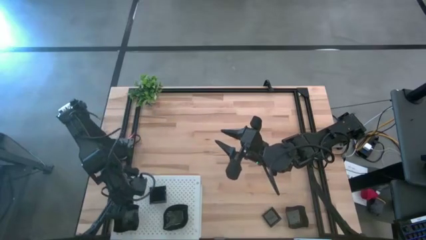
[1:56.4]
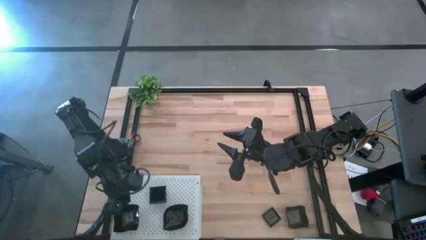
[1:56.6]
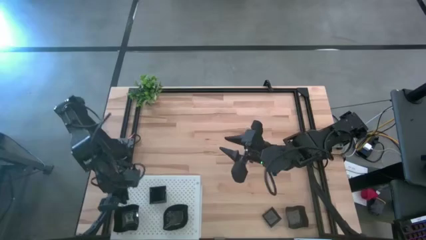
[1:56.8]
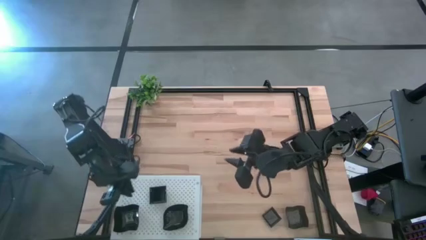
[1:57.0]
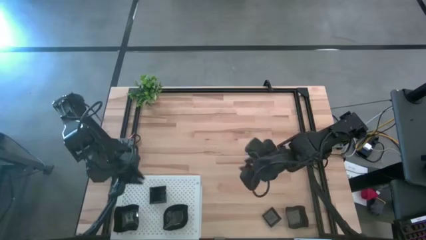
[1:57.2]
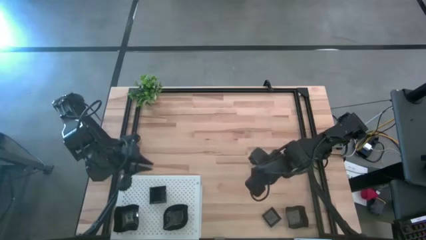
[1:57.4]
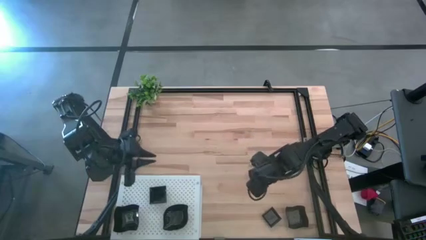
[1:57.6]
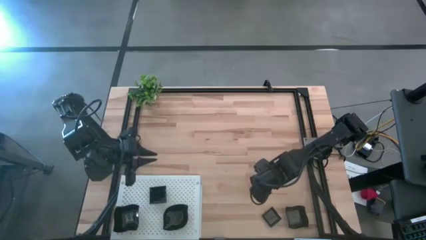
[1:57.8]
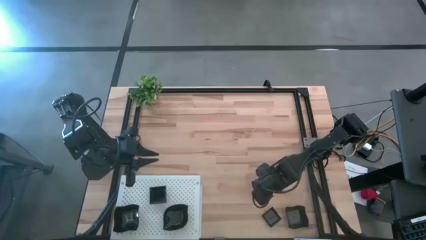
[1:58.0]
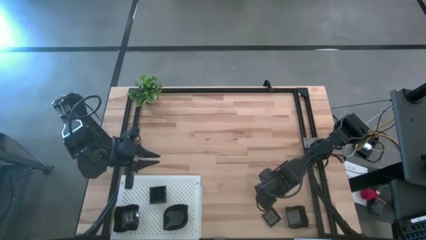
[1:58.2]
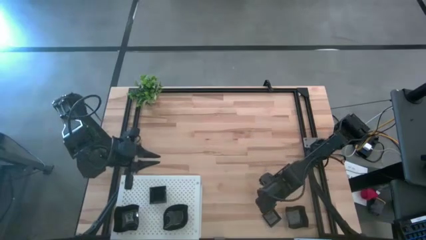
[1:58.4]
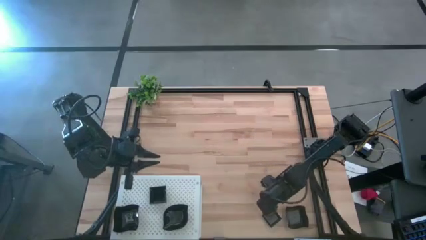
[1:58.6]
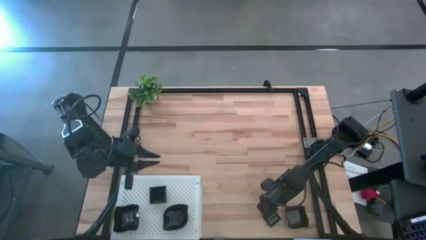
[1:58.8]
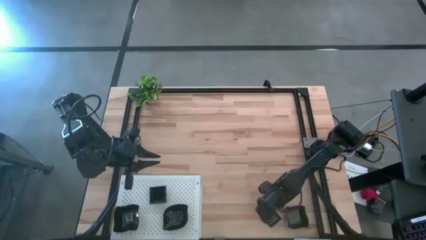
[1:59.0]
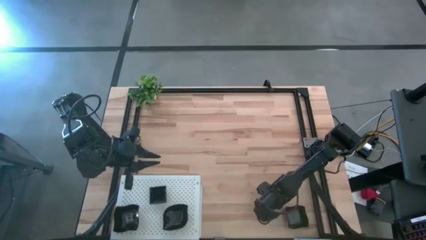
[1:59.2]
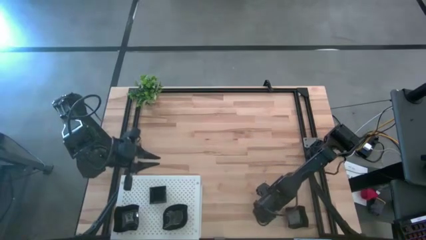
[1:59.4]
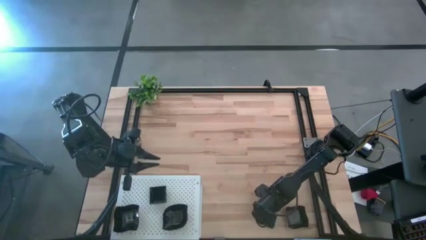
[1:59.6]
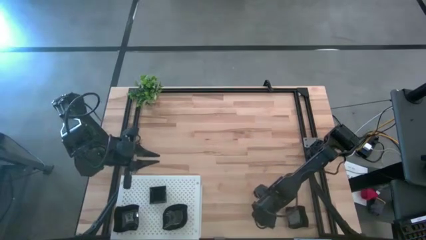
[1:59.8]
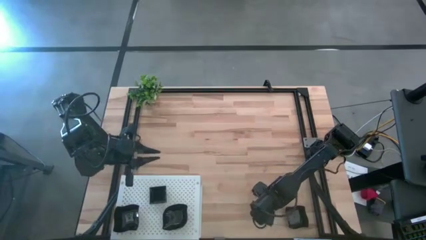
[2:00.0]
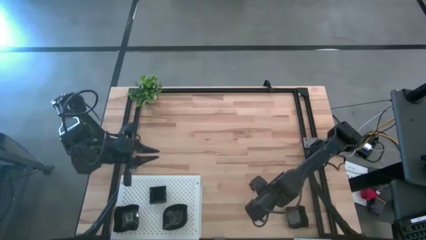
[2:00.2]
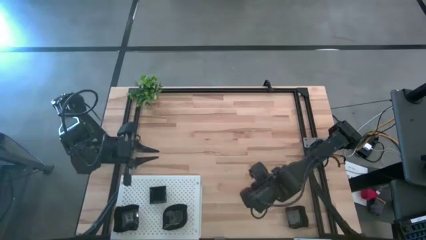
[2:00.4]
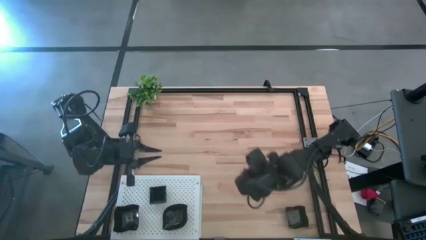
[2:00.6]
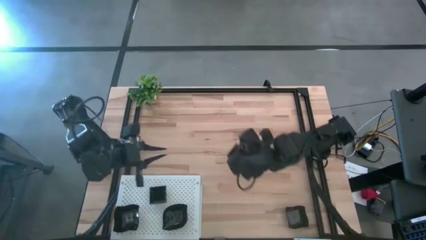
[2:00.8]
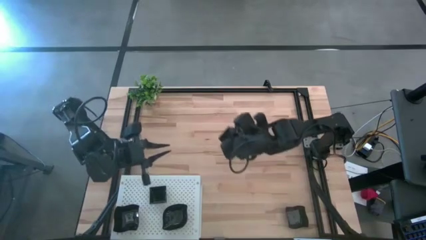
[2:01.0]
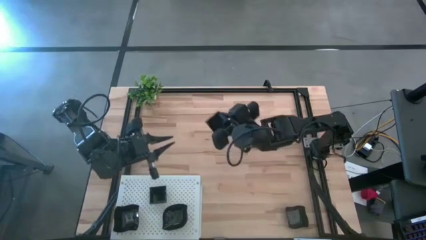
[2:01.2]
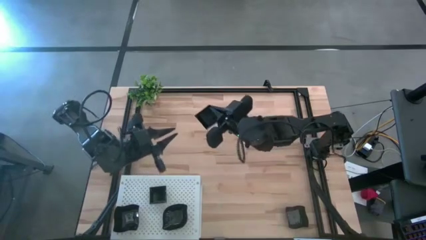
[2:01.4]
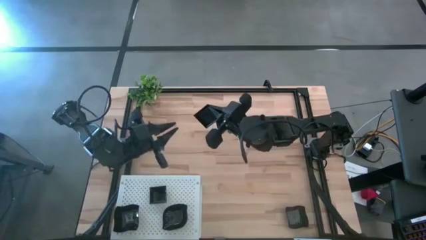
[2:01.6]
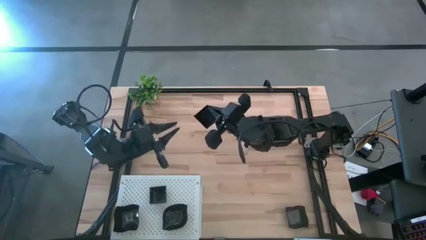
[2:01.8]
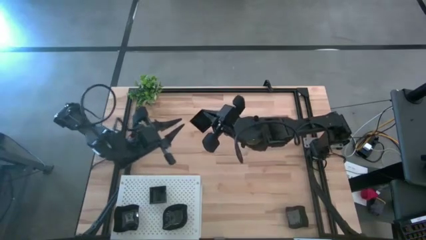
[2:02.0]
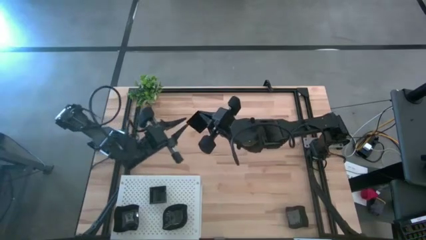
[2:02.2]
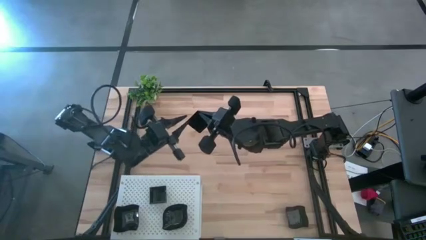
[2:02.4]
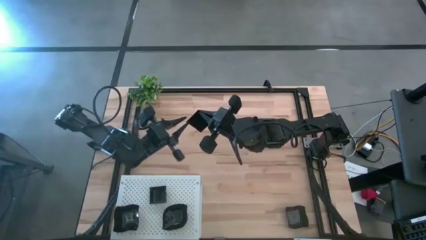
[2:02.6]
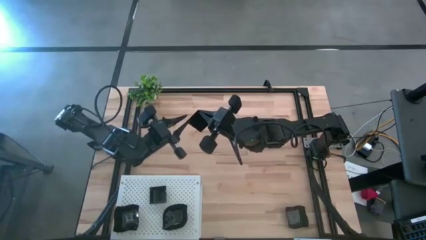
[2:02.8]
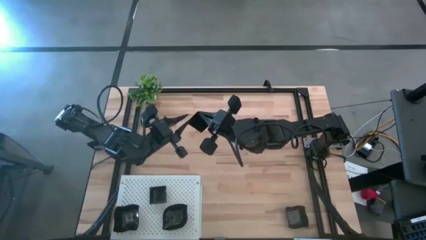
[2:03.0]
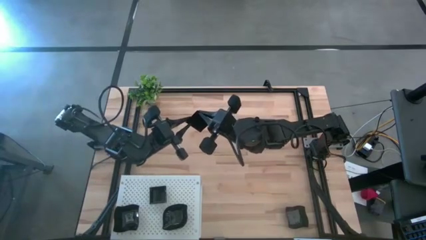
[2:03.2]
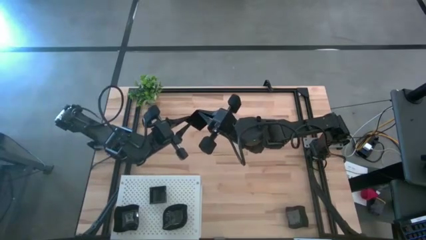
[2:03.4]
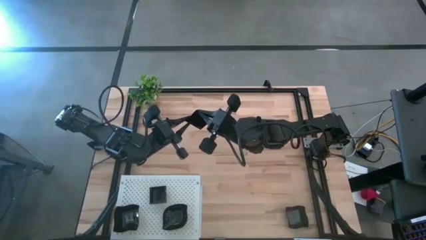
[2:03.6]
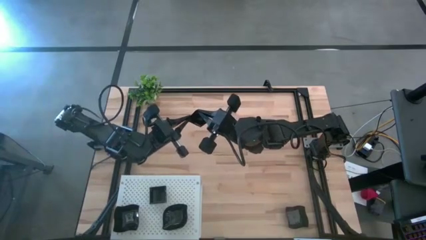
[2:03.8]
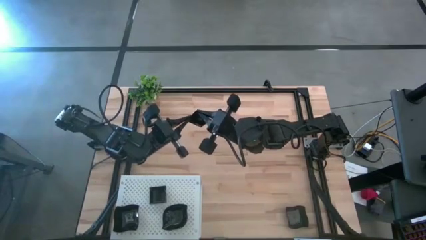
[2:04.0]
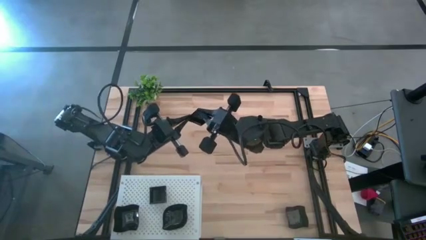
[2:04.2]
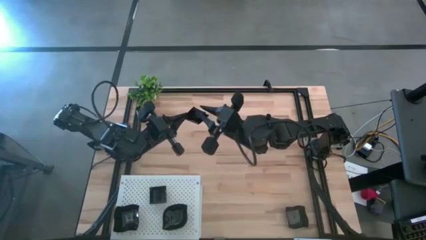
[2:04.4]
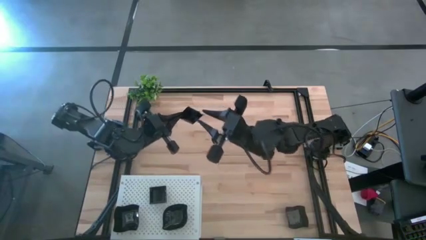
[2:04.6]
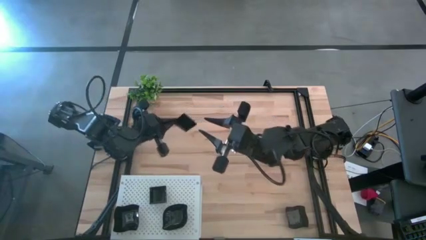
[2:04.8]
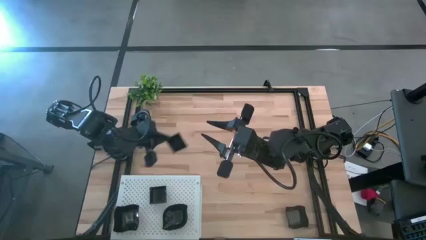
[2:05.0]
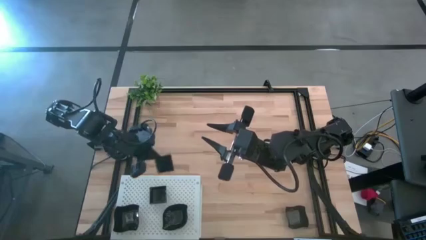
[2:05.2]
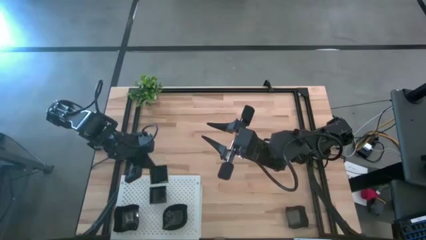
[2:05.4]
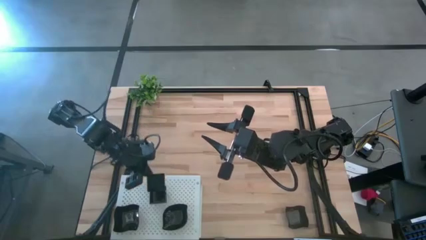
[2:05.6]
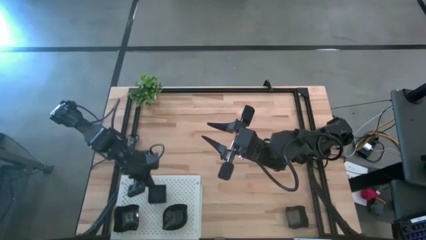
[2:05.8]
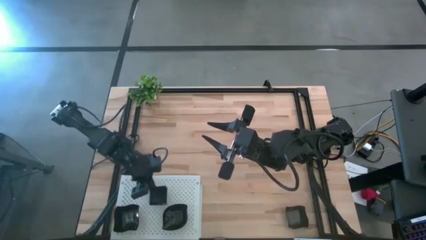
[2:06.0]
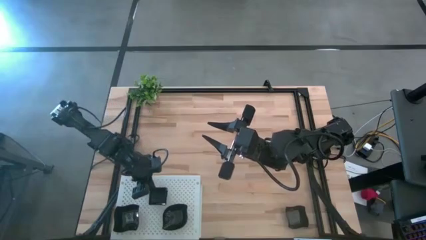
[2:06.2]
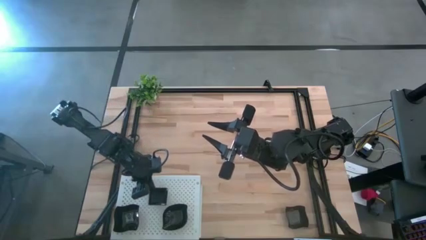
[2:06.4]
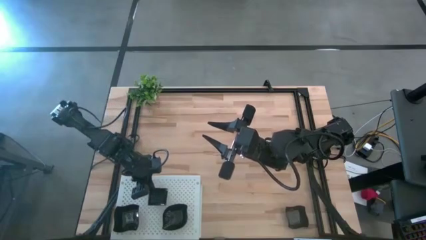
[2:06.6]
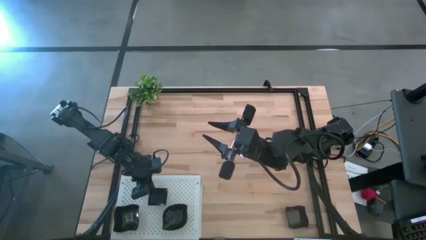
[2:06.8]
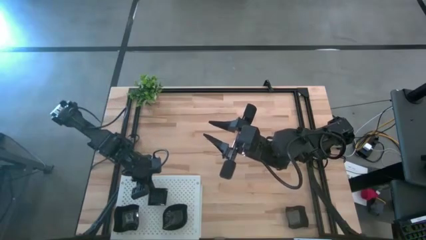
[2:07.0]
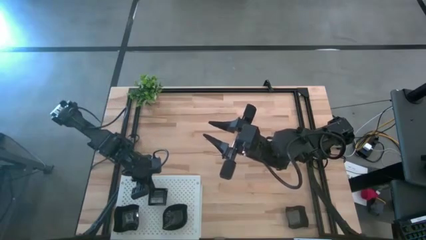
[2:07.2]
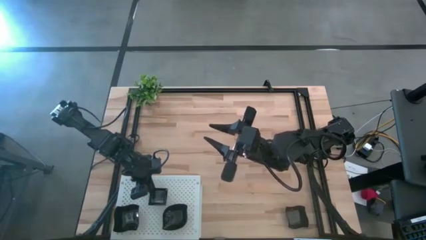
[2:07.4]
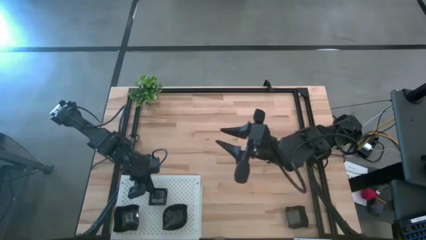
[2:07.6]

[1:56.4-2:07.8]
Task: Pick & Place Mini shaped plates
Stack the square plate on top of the square plate on the shelf
